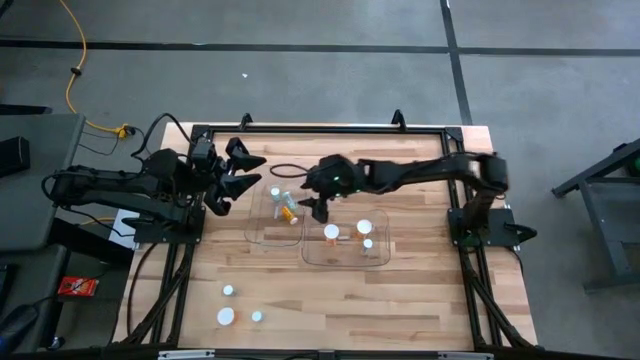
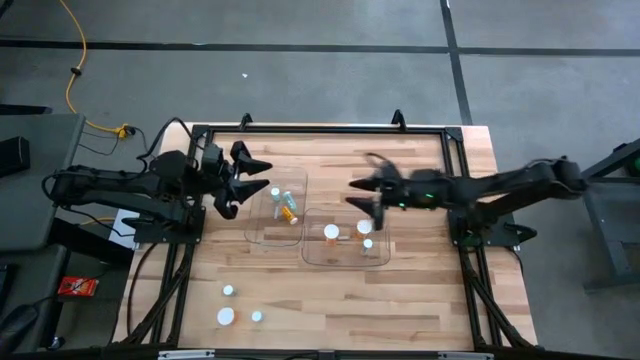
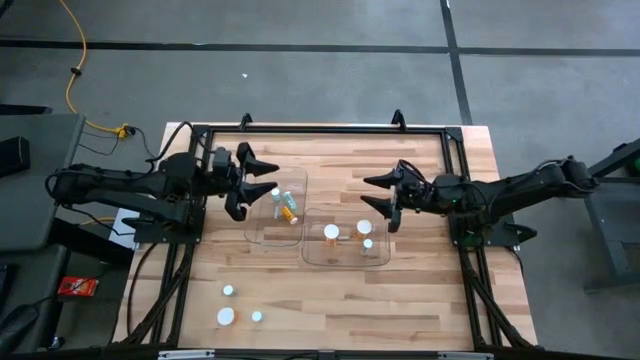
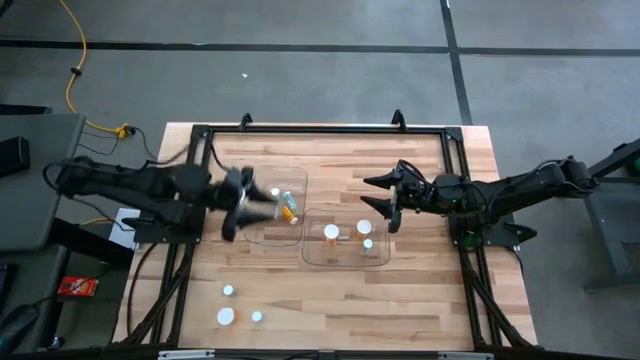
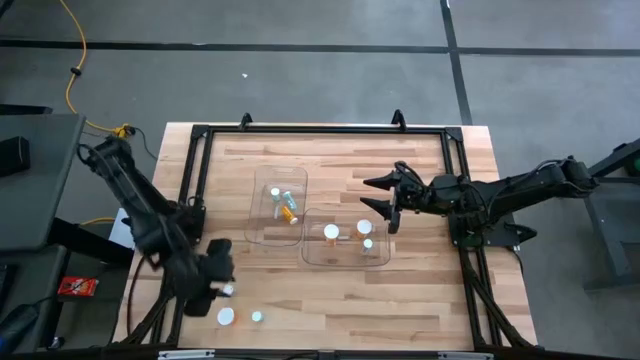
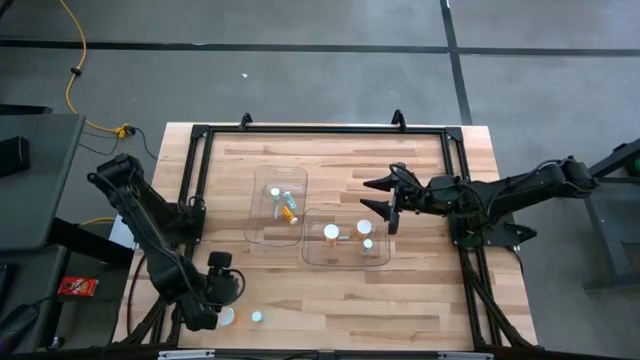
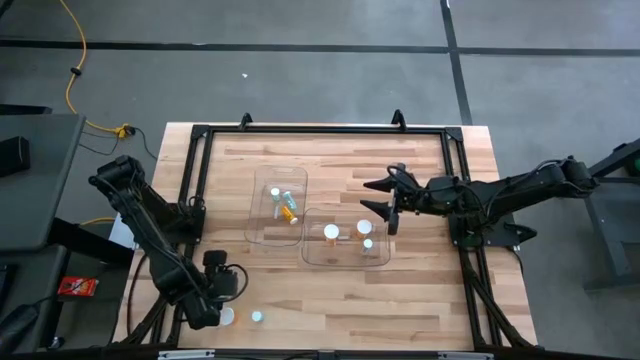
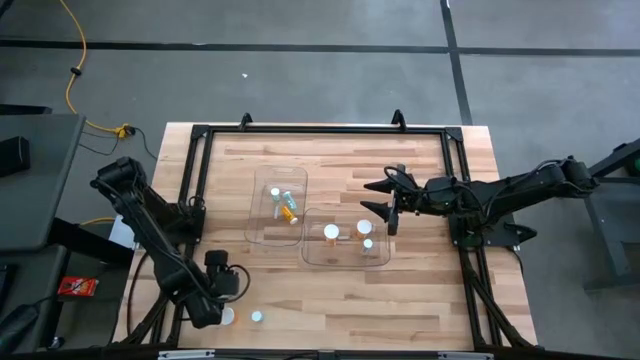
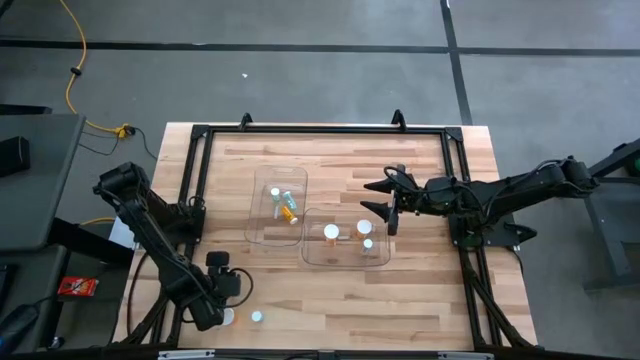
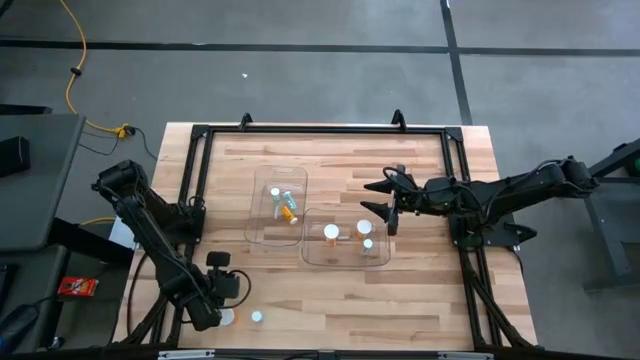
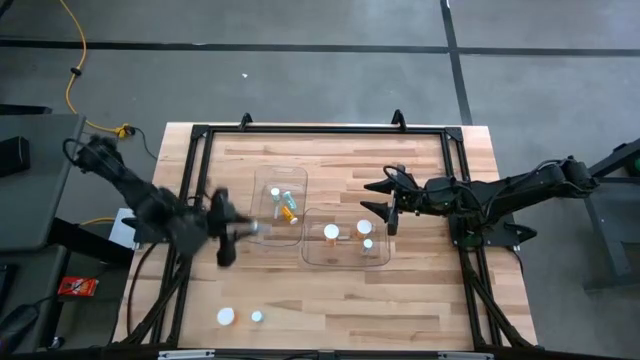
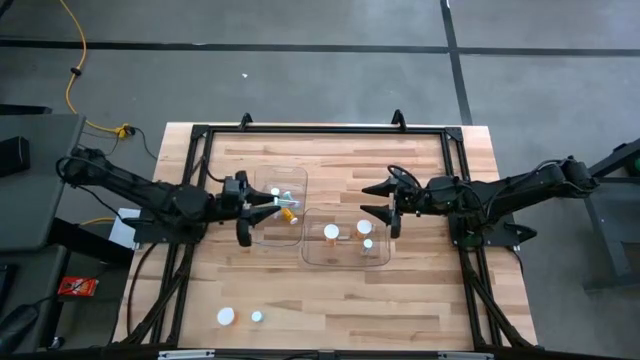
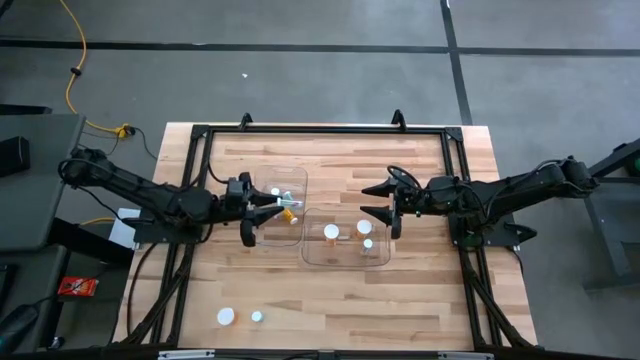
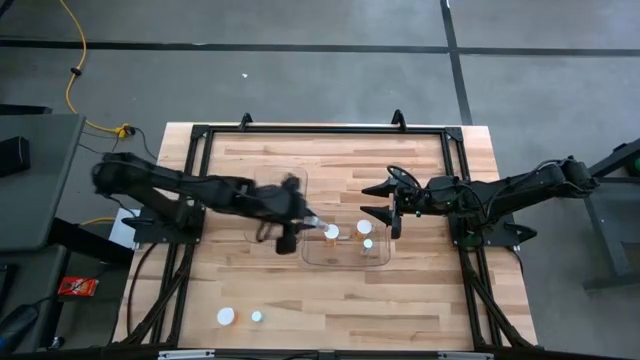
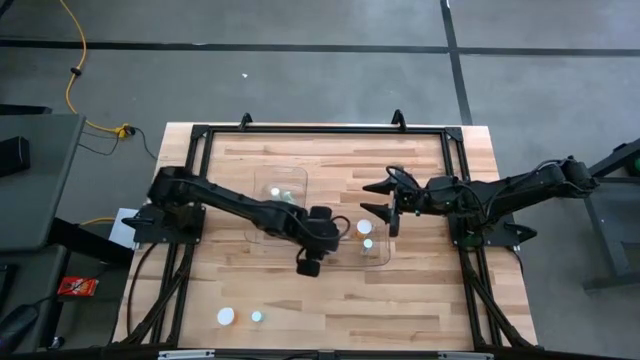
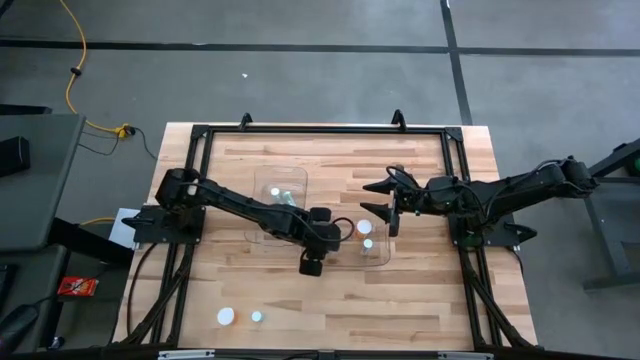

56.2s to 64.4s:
Task: Pick and place medicine bottles into bin by pill shape (circle, oval)
Put the blue capsule bottle into the right transparent bin

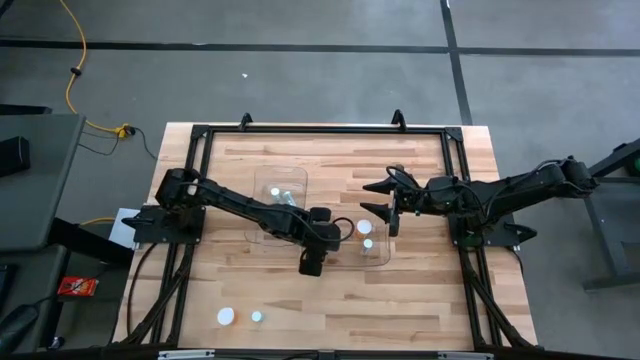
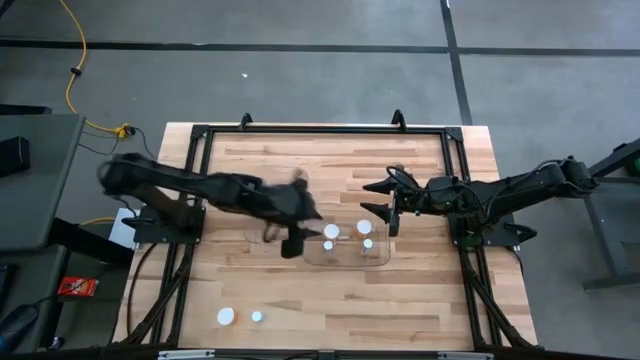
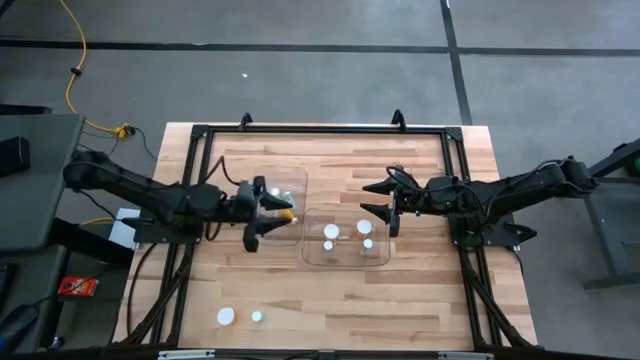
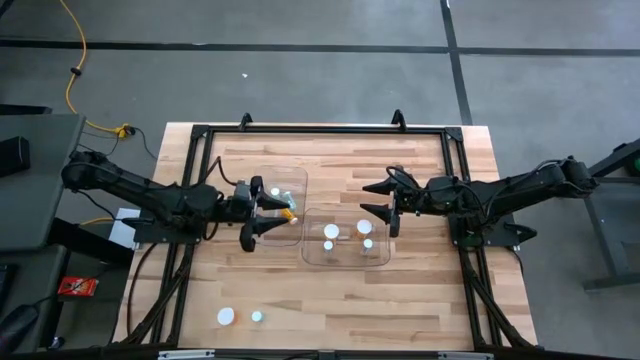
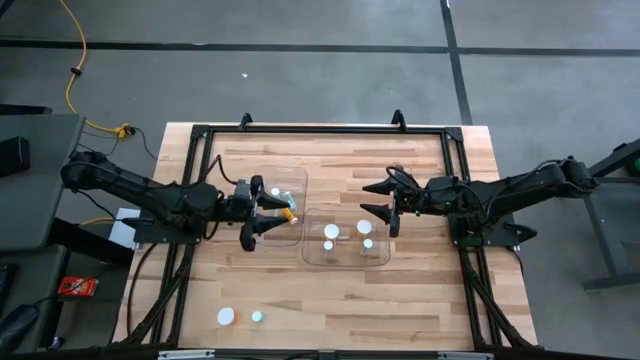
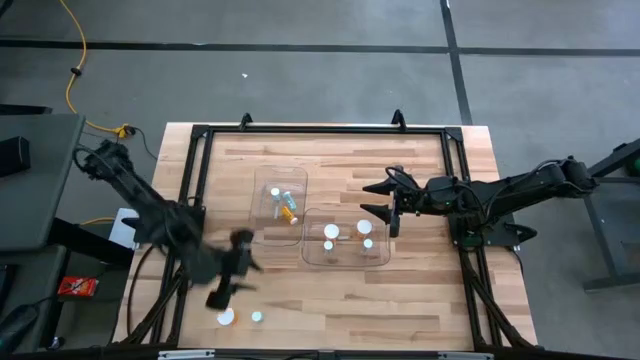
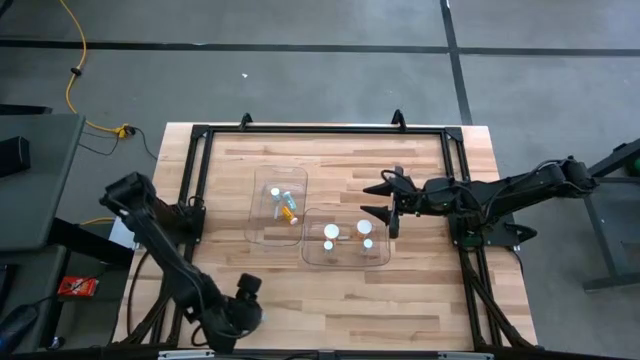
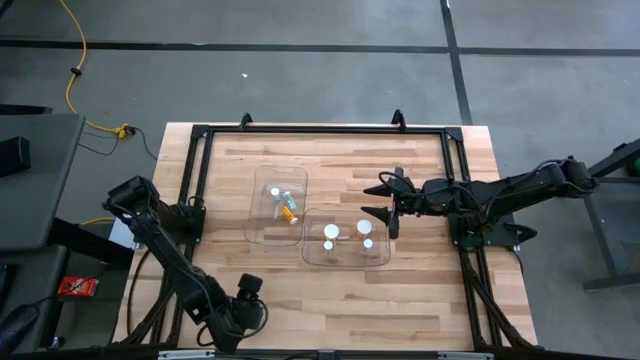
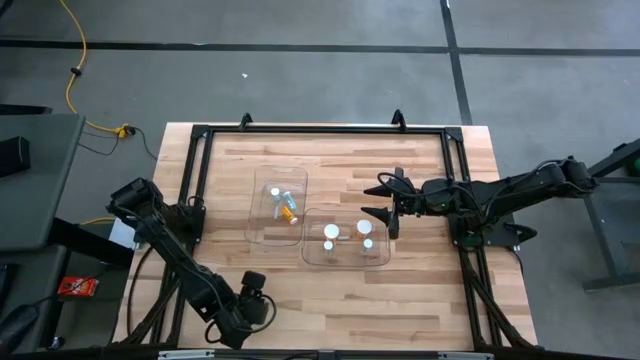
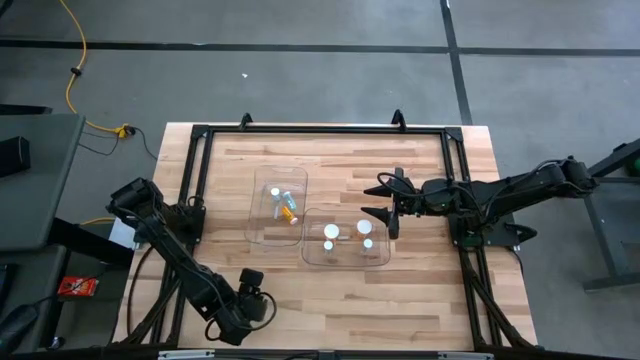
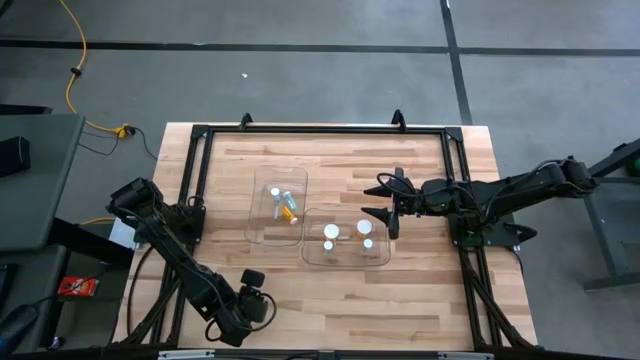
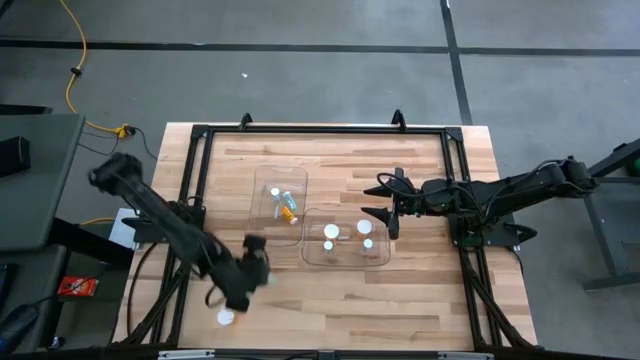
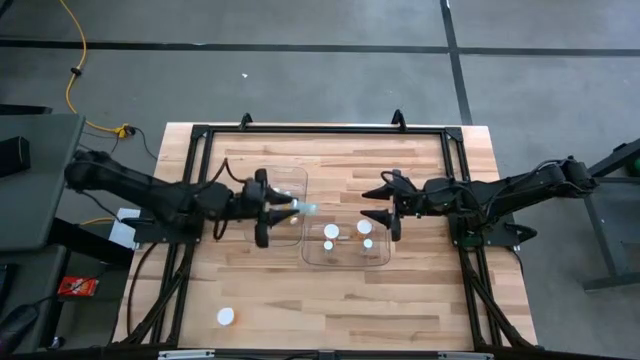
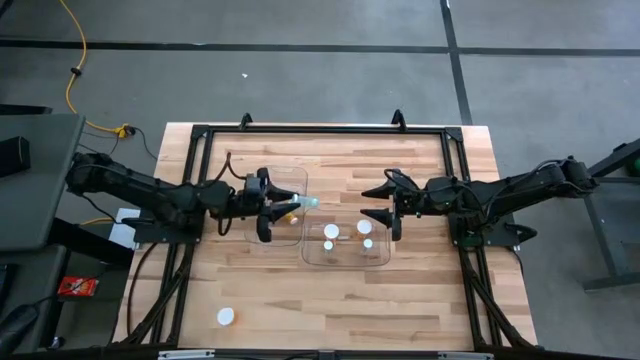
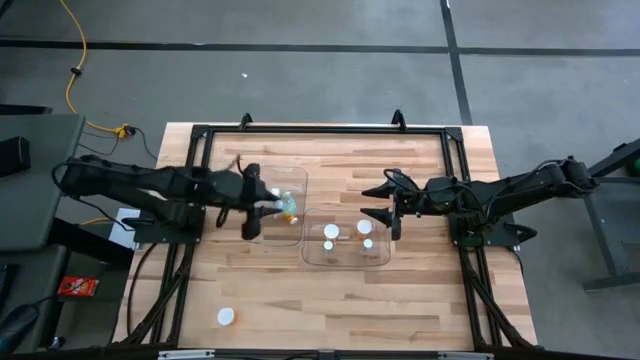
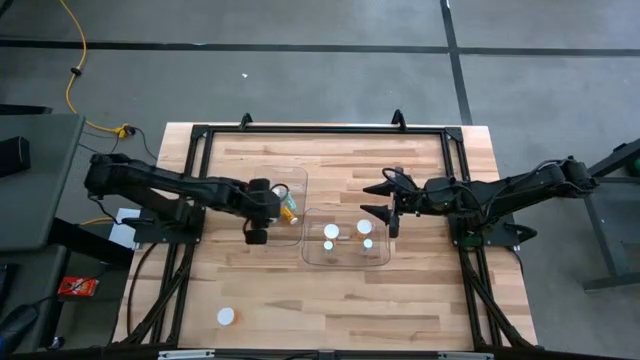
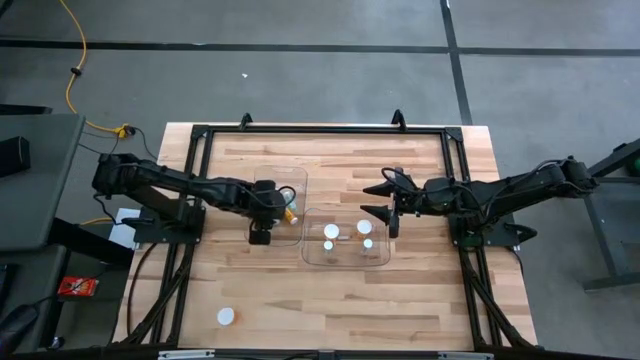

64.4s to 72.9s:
Put the blue tablet bottle into the left transparent bin

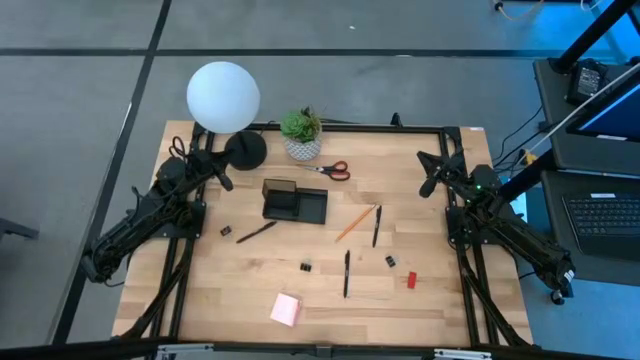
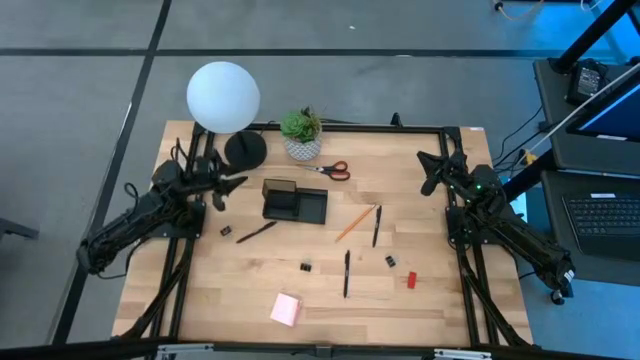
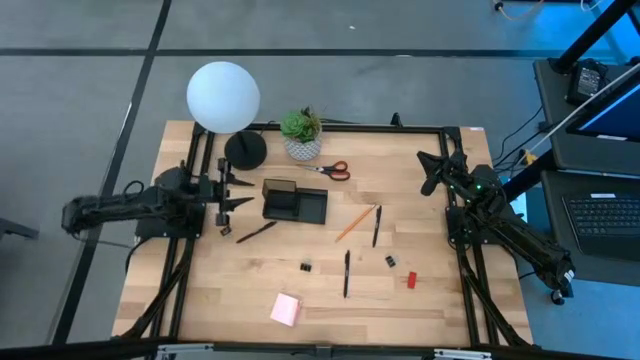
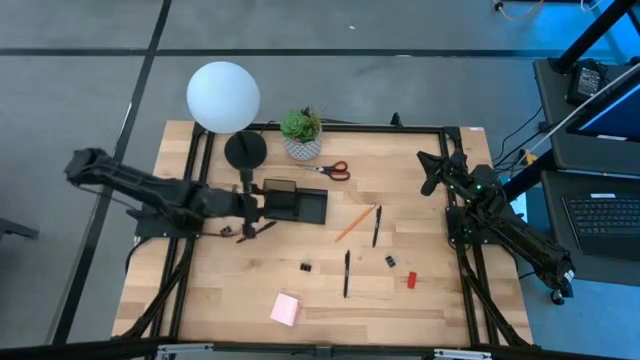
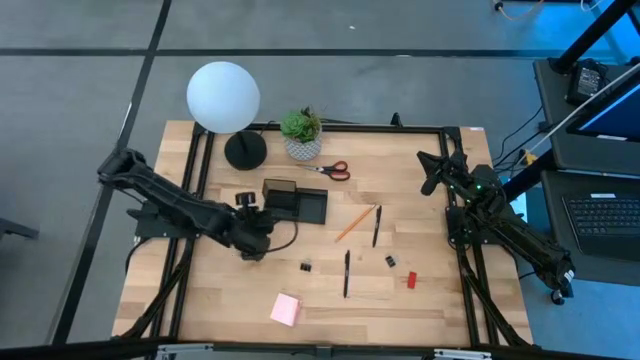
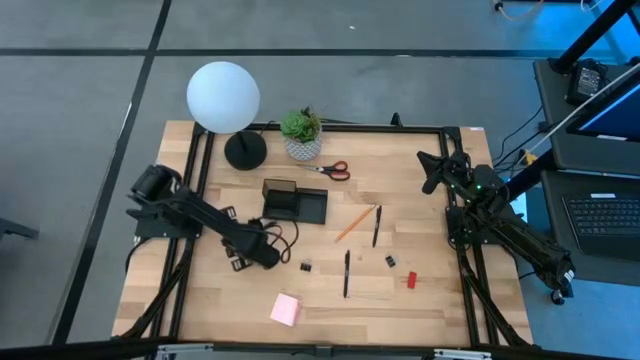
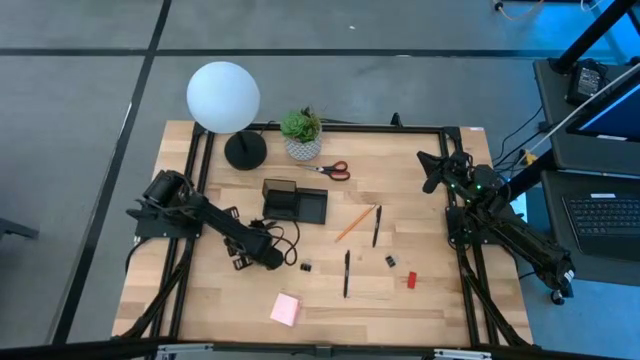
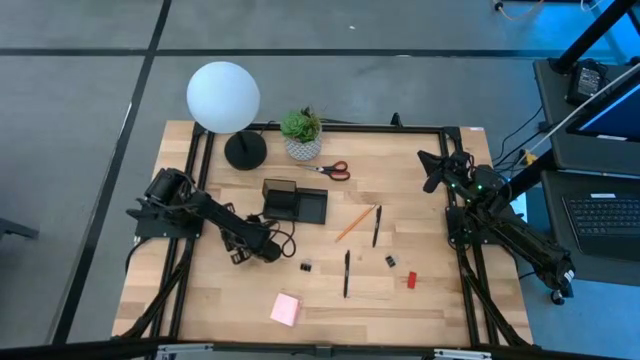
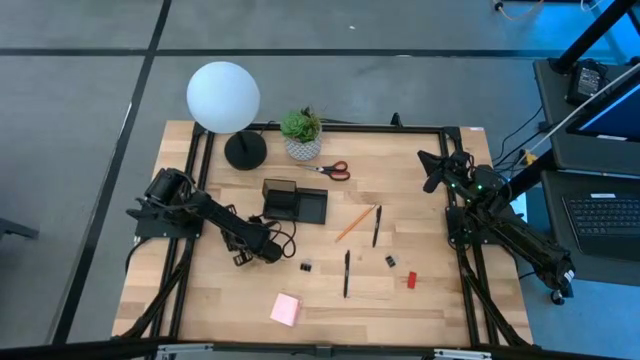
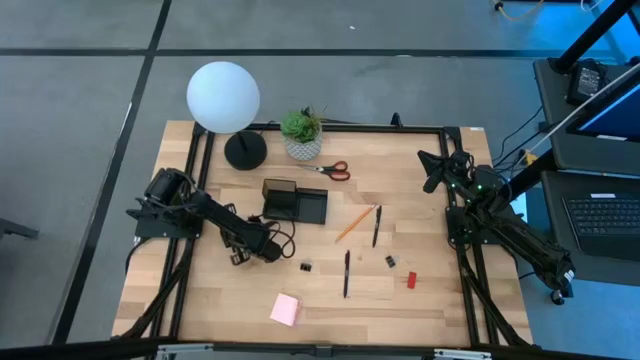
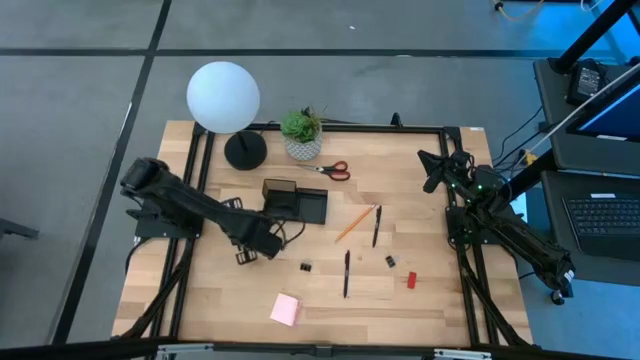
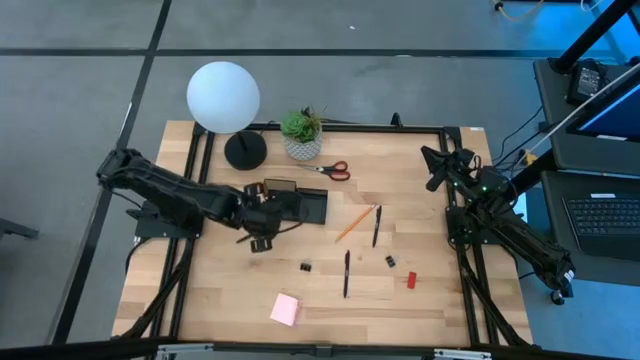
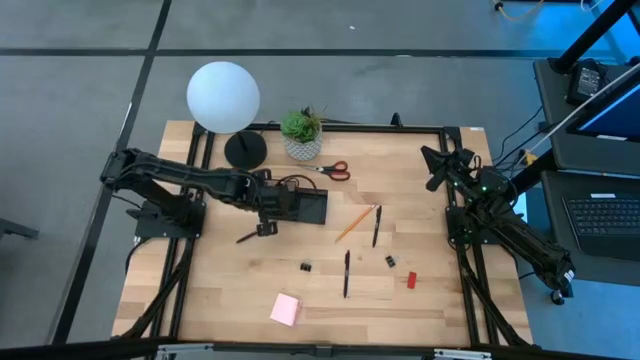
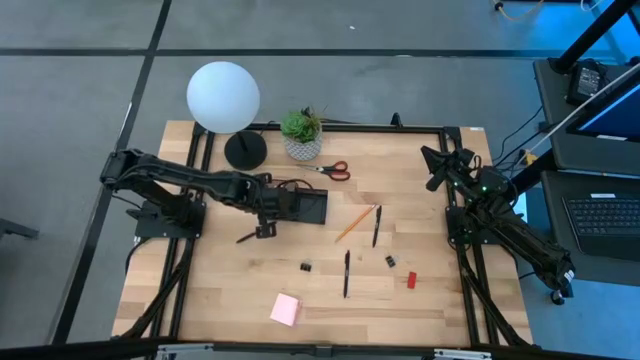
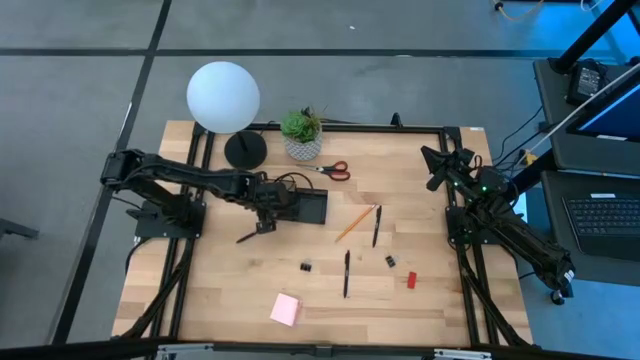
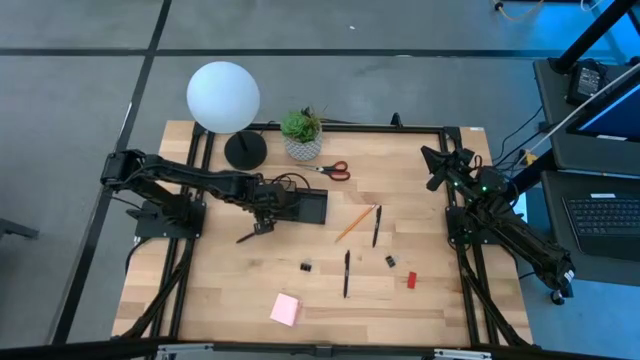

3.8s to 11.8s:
Task: Pick and place office supplies into organizer
Put the black binder clip into the black desk organizer
